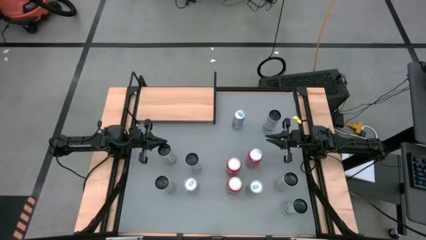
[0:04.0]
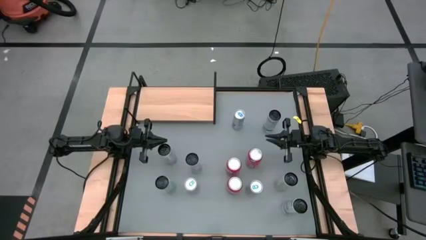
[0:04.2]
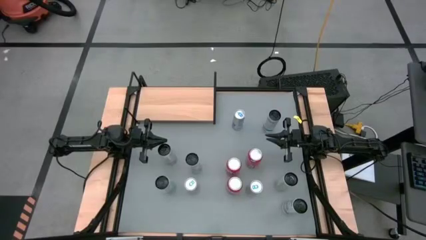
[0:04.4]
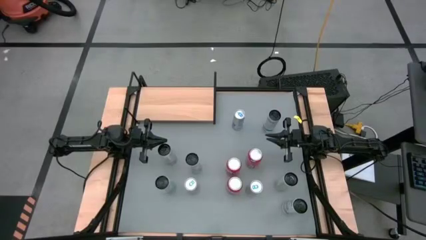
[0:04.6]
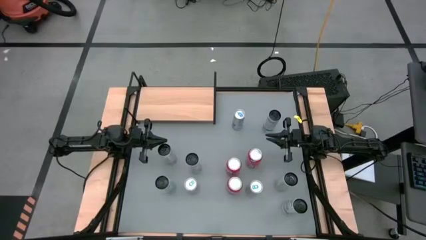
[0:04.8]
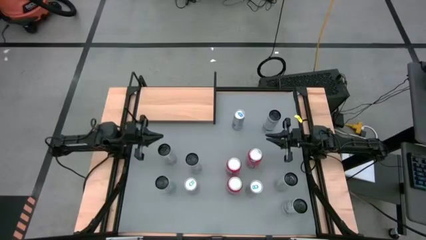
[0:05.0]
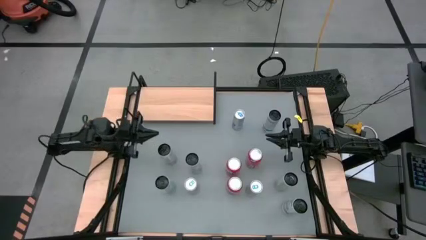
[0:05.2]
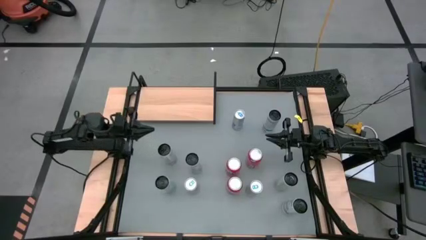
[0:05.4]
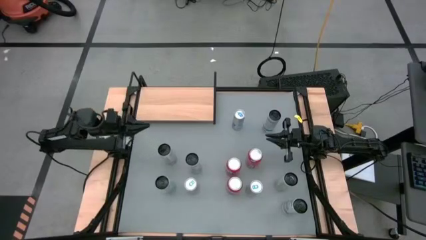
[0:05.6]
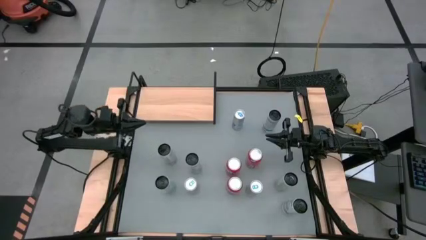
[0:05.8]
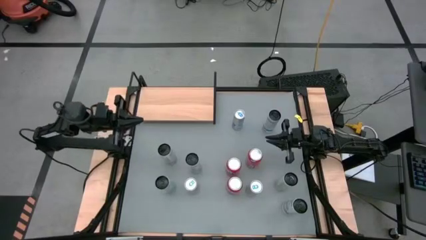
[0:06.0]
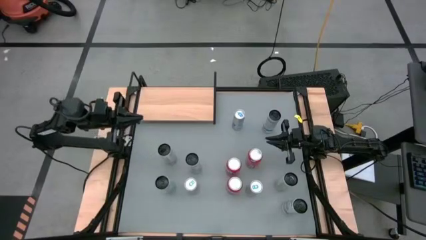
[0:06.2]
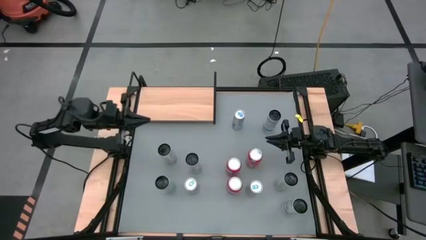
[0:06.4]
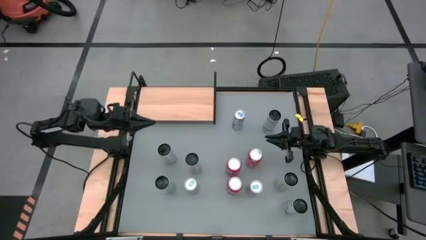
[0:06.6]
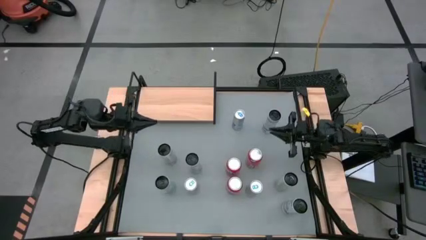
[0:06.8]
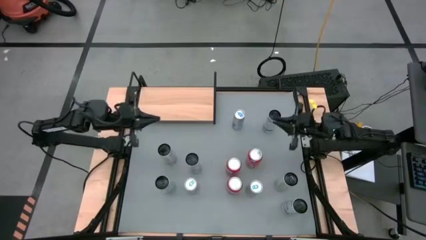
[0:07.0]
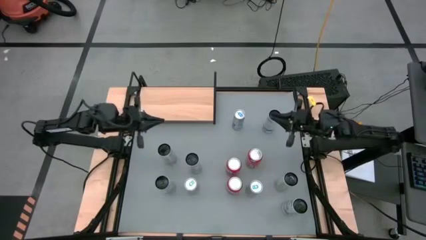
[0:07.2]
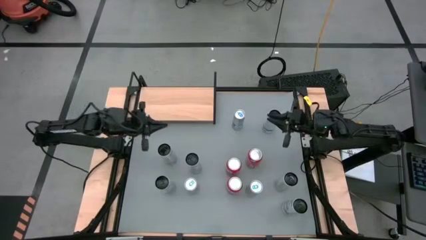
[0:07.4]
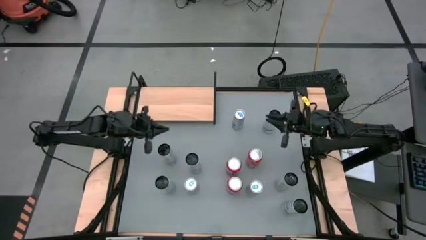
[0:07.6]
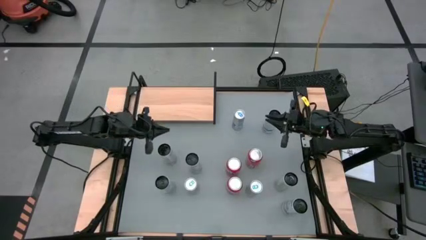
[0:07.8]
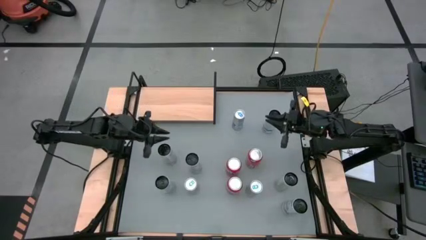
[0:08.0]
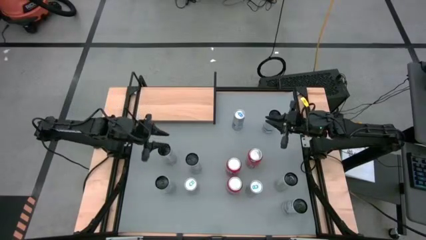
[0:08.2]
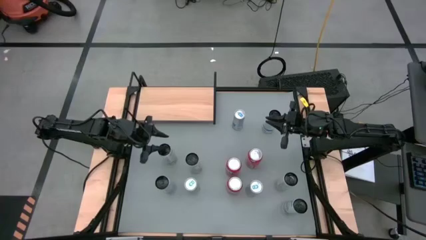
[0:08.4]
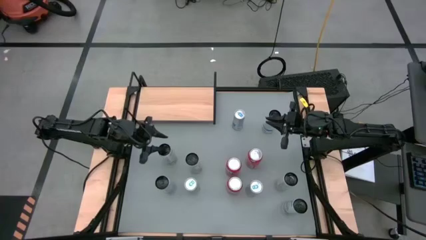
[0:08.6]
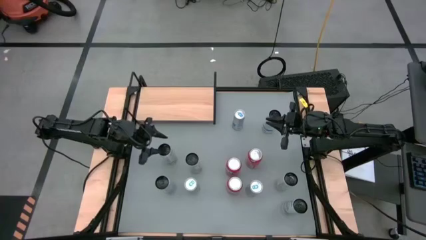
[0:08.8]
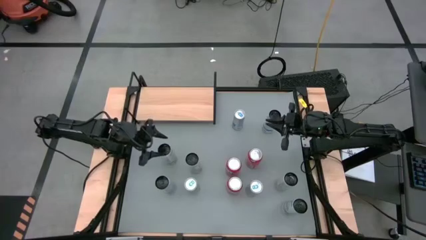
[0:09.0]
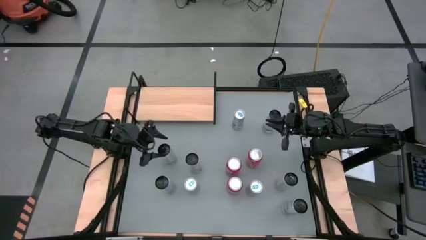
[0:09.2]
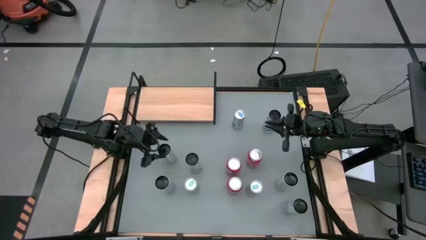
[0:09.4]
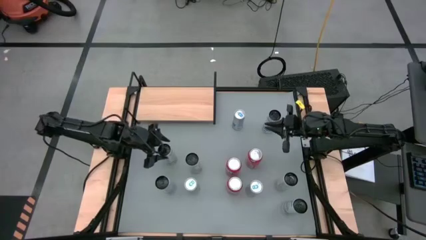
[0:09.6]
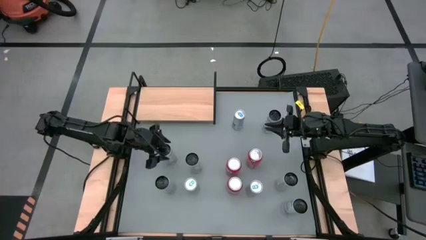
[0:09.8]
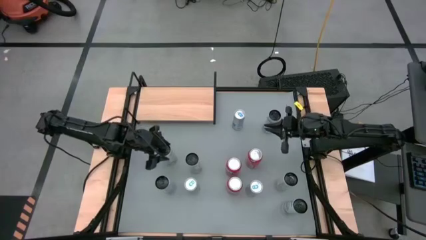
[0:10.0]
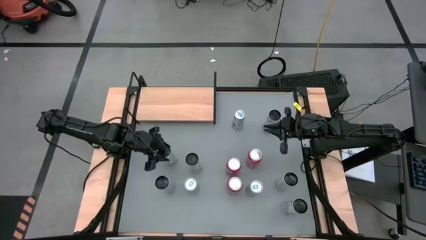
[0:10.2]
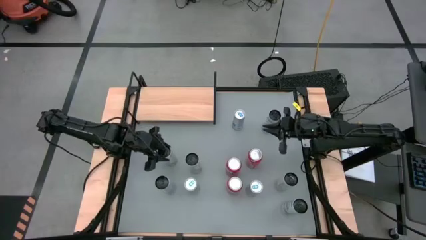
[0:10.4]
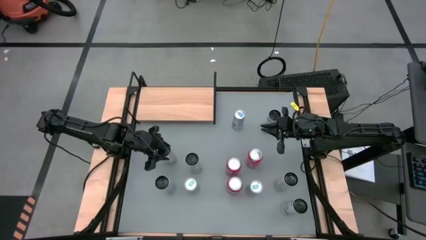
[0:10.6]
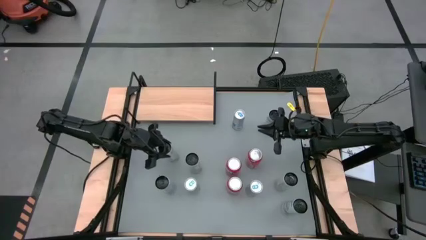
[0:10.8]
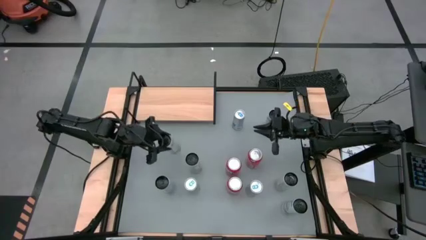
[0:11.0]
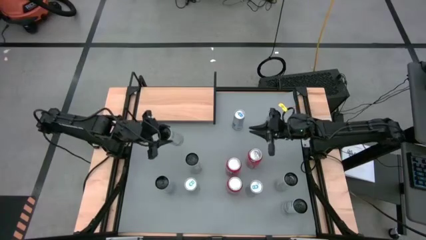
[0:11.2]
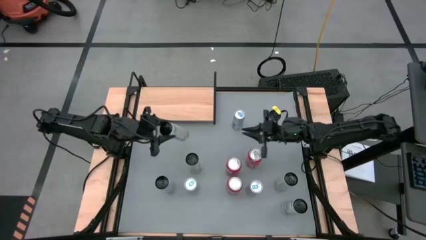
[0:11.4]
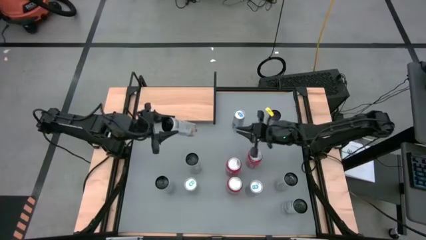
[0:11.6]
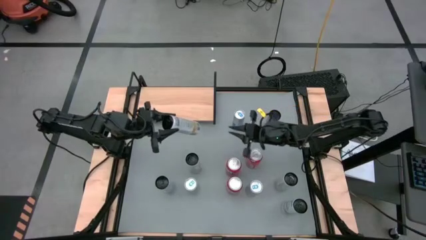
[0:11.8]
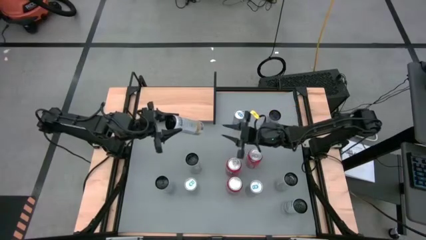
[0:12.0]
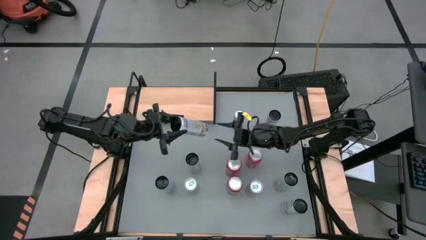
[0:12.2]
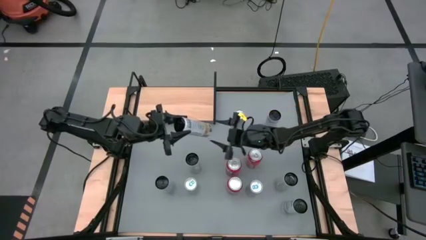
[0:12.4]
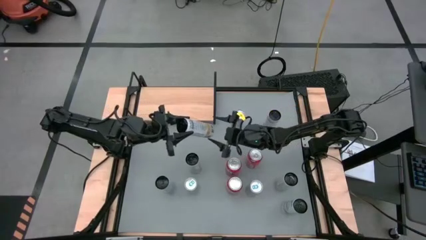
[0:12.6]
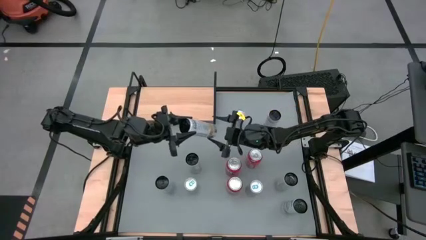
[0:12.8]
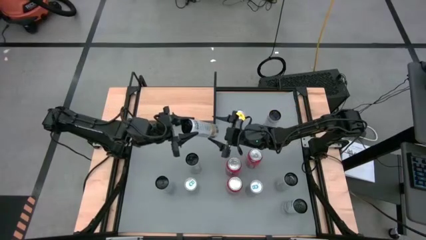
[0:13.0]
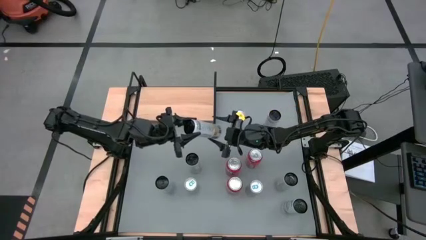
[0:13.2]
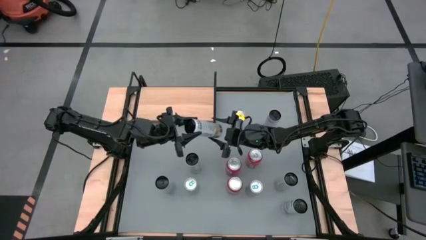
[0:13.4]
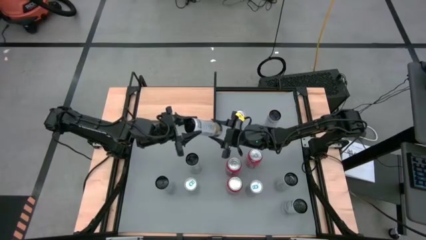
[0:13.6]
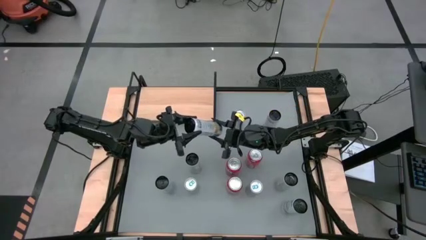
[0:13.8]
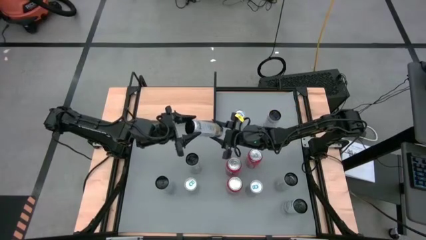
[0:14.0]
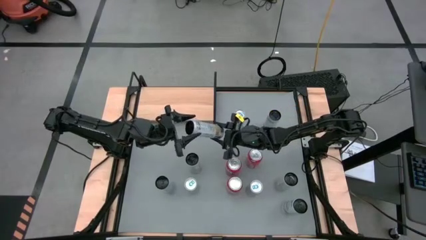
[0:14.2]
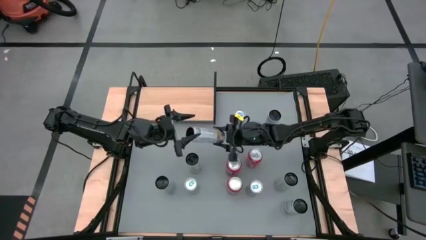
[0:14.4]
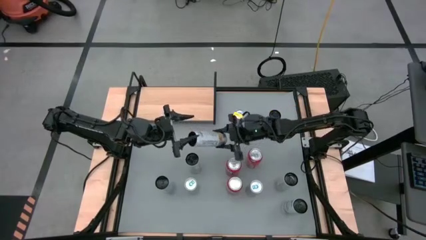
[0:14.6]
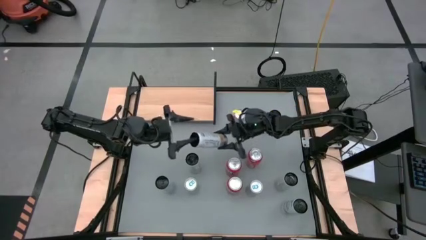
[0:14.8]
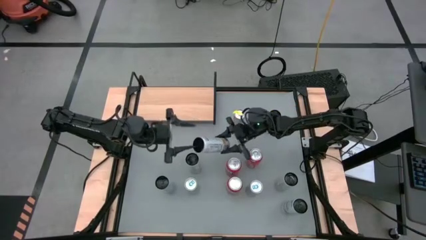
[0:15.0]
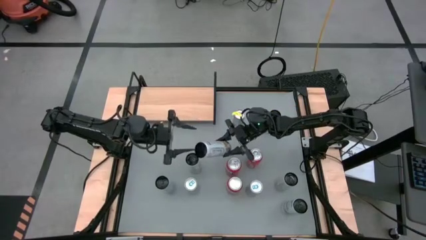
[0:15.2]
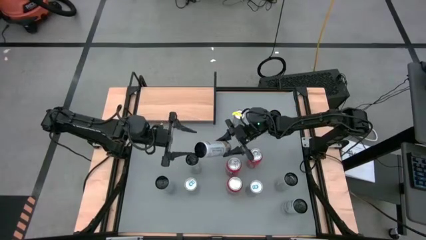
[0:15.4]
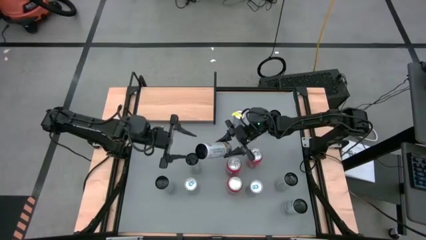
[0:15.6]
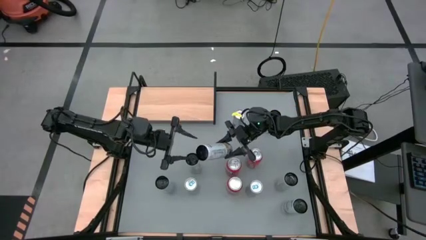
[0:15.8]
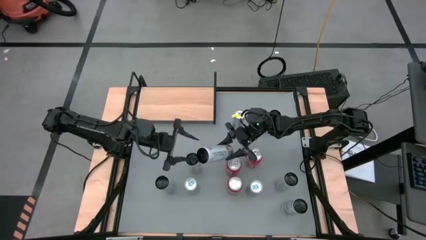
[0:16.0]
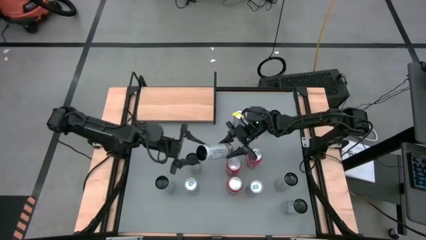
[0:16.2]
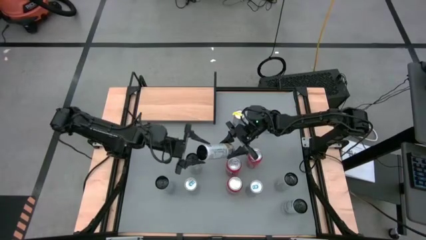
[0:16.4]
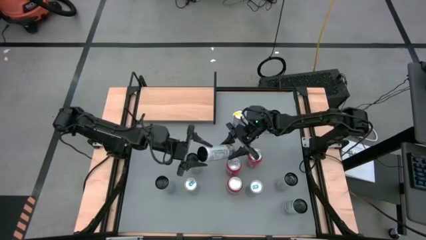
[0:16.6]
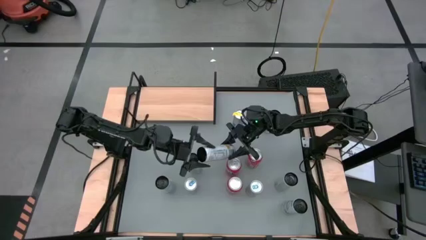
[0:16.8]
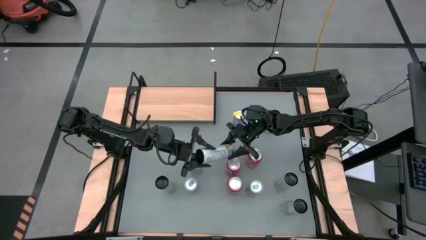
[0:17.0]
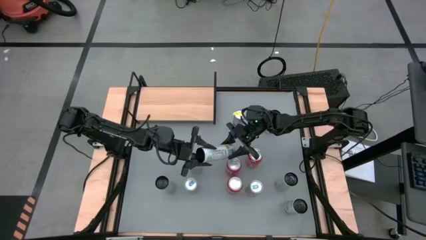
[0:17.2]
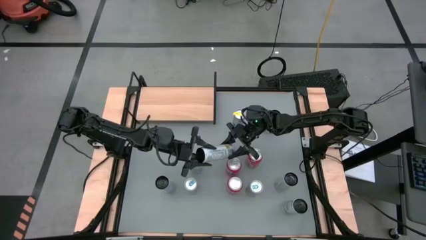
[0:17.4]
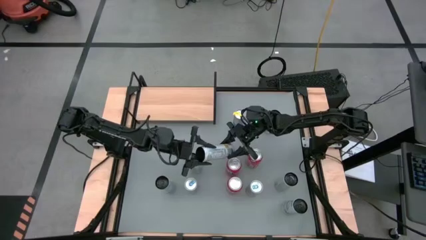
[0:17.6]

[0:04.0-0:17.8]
Task: Place canned beverage on shelf
Put the top left white-yellow soda can on the shelf
